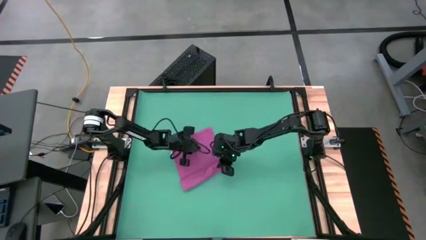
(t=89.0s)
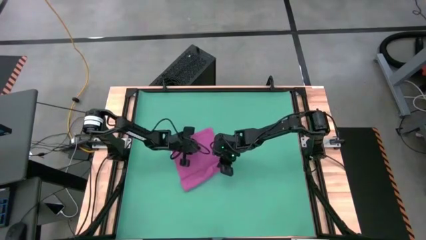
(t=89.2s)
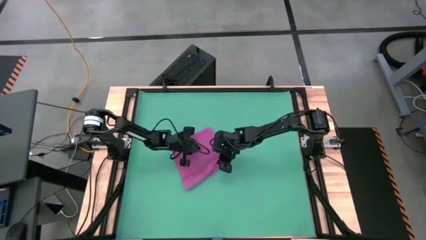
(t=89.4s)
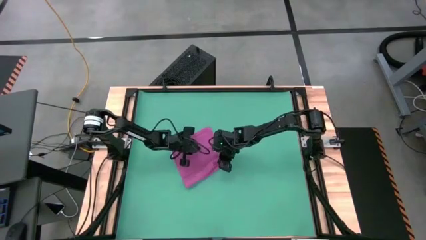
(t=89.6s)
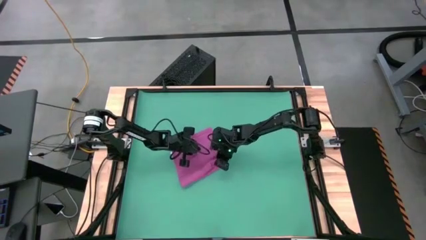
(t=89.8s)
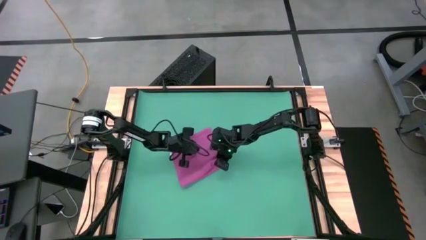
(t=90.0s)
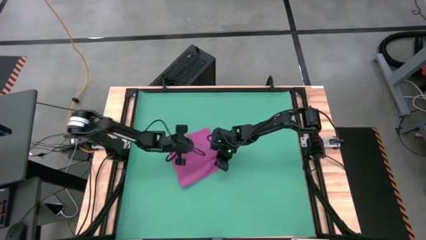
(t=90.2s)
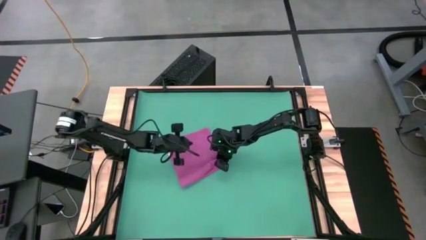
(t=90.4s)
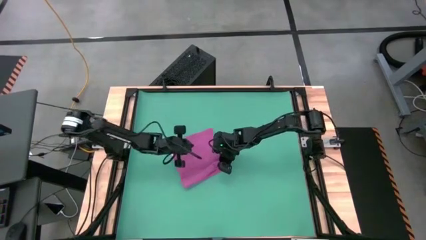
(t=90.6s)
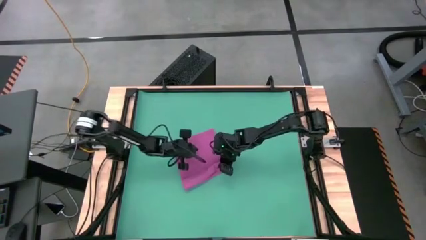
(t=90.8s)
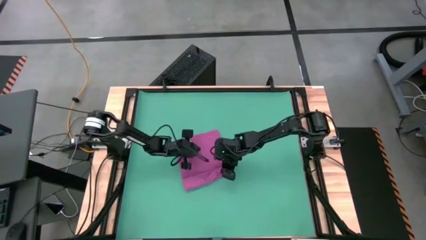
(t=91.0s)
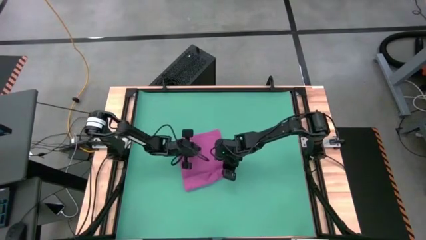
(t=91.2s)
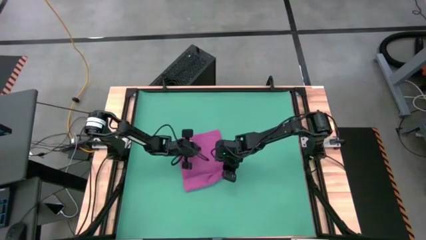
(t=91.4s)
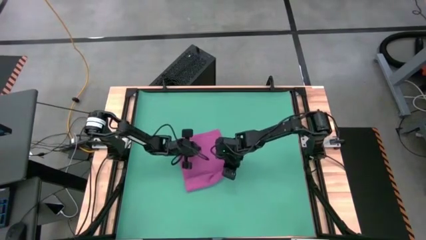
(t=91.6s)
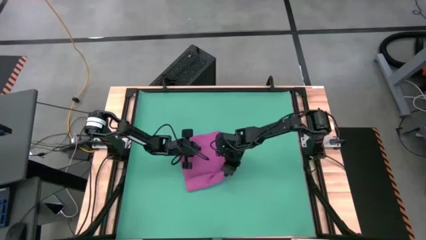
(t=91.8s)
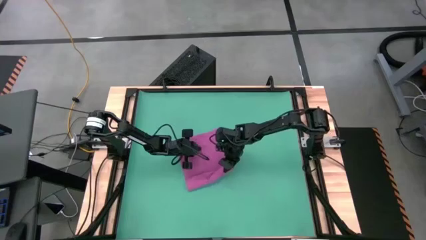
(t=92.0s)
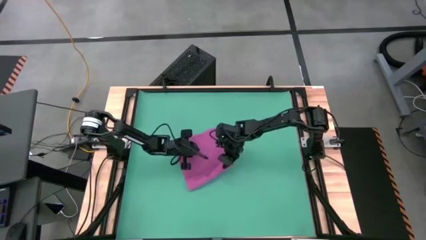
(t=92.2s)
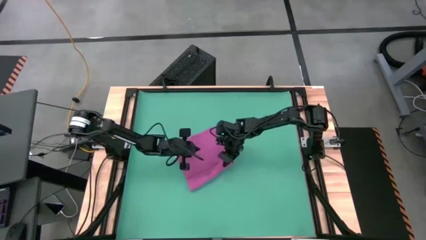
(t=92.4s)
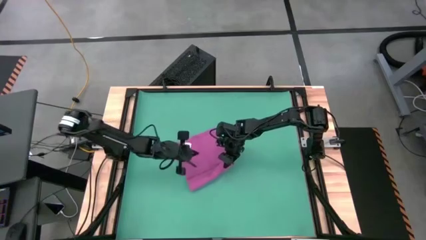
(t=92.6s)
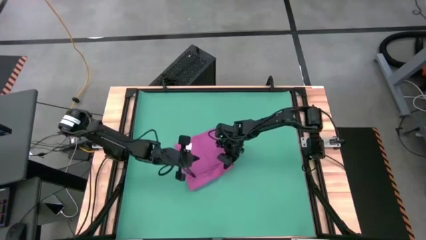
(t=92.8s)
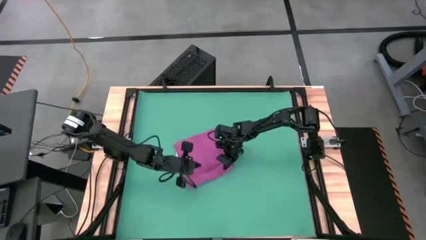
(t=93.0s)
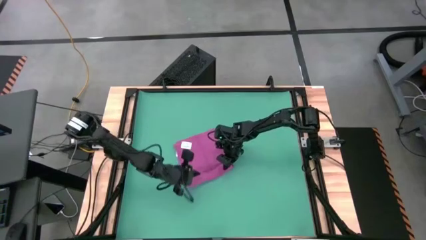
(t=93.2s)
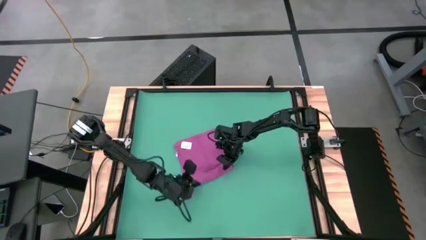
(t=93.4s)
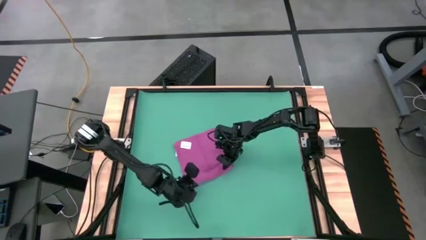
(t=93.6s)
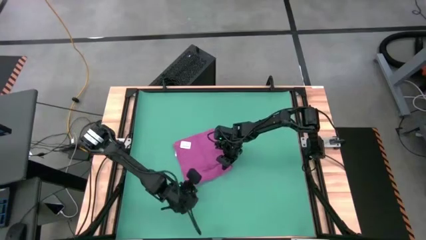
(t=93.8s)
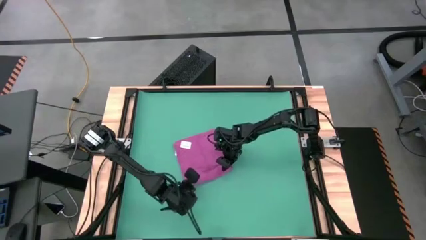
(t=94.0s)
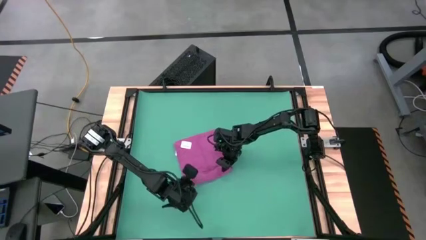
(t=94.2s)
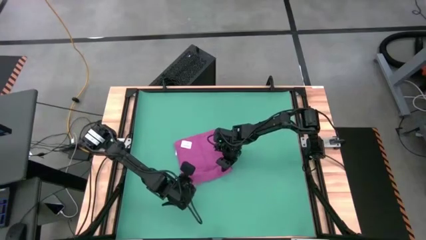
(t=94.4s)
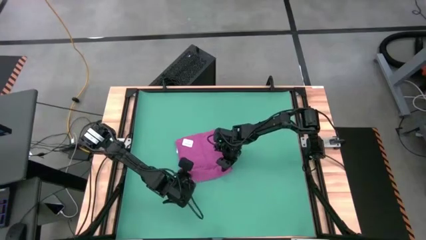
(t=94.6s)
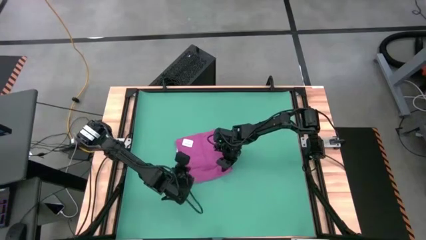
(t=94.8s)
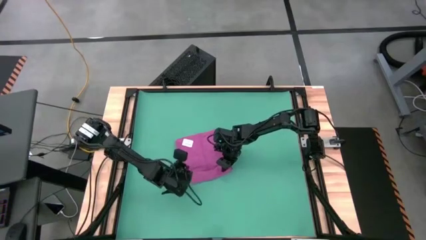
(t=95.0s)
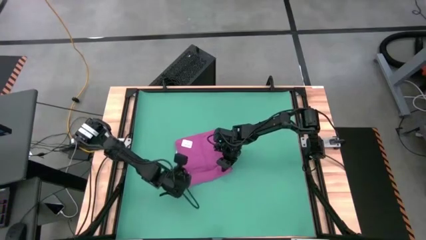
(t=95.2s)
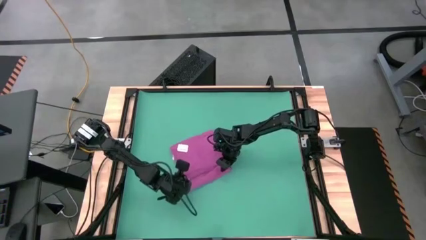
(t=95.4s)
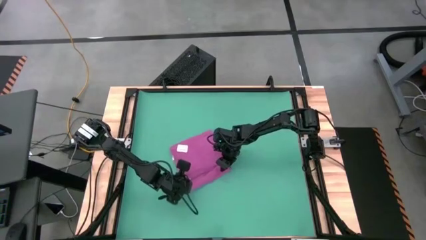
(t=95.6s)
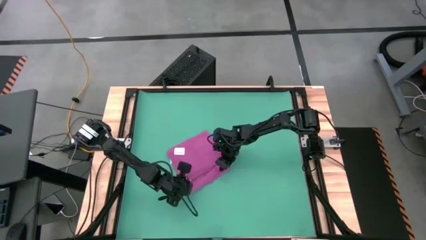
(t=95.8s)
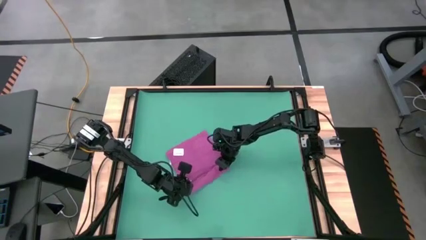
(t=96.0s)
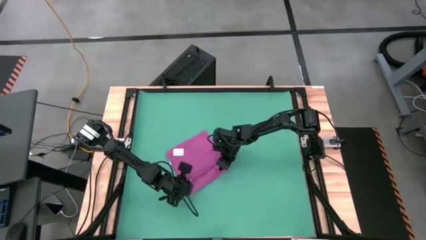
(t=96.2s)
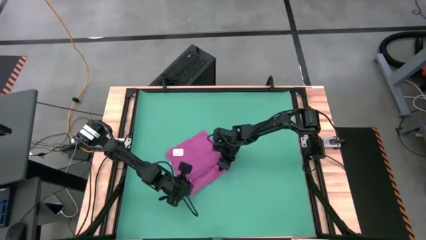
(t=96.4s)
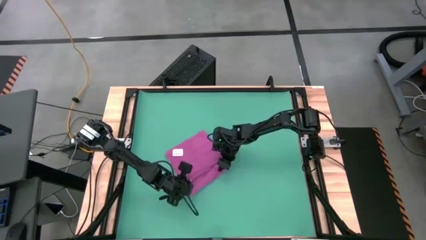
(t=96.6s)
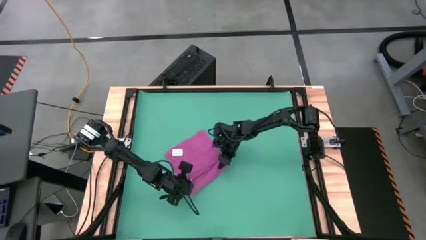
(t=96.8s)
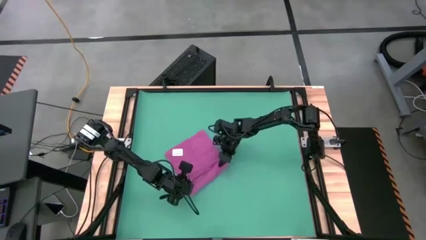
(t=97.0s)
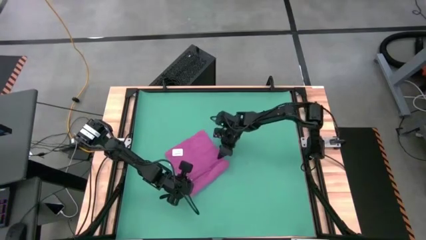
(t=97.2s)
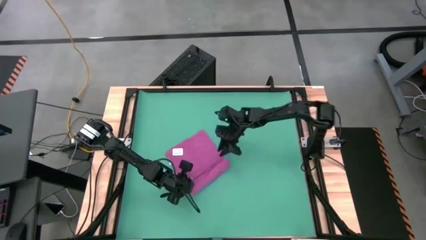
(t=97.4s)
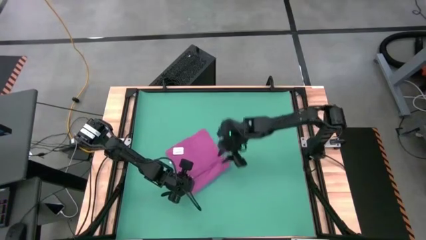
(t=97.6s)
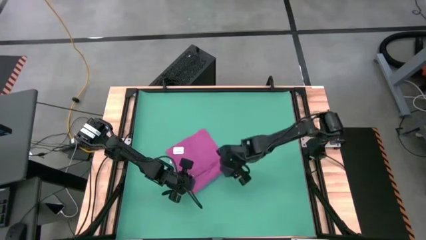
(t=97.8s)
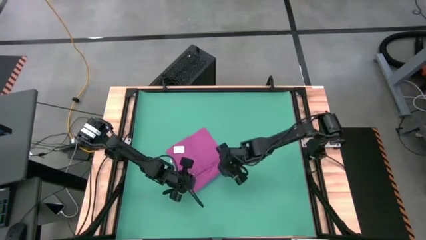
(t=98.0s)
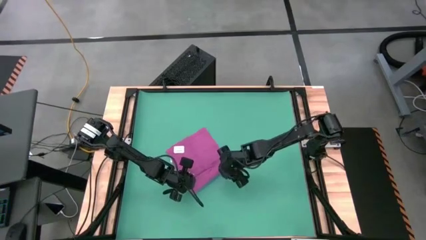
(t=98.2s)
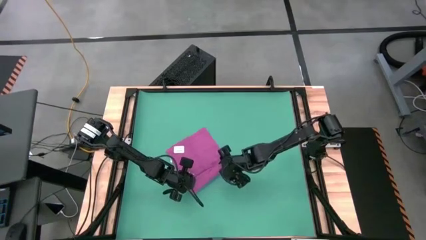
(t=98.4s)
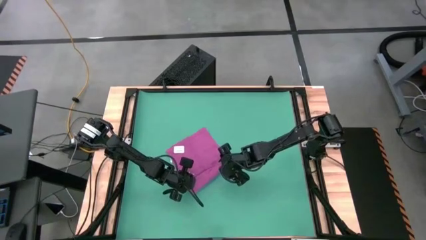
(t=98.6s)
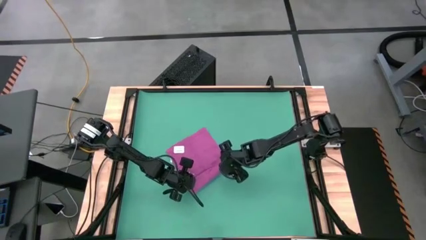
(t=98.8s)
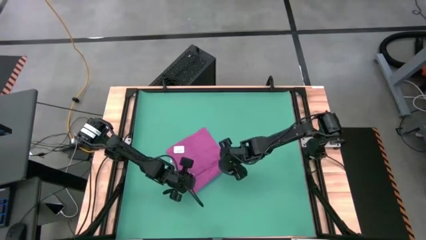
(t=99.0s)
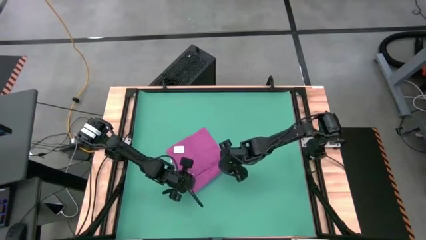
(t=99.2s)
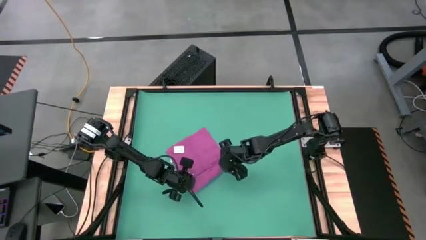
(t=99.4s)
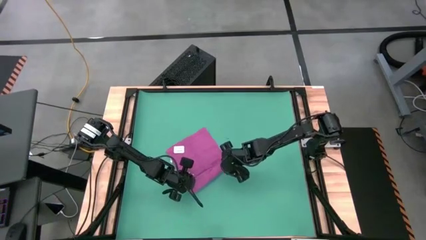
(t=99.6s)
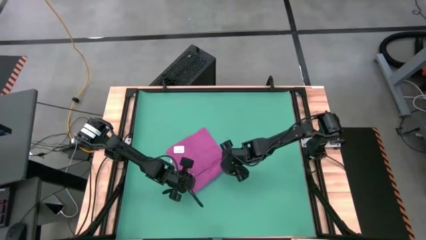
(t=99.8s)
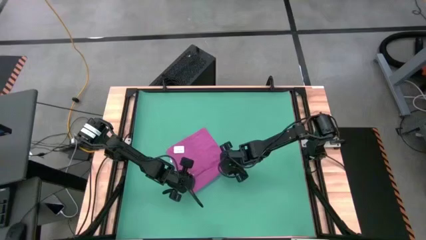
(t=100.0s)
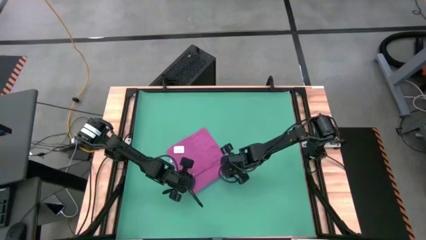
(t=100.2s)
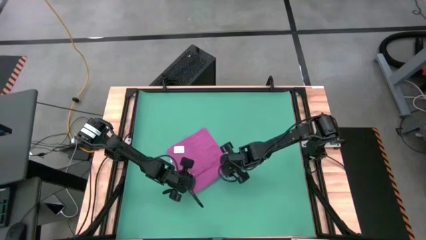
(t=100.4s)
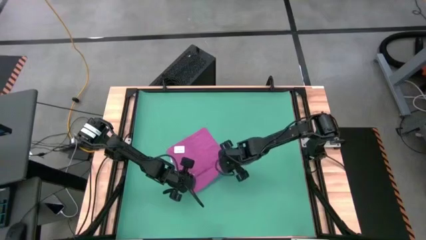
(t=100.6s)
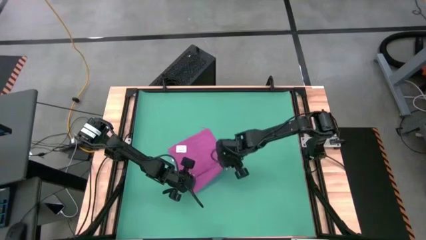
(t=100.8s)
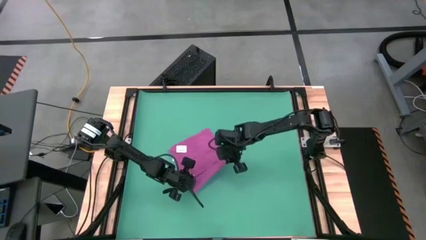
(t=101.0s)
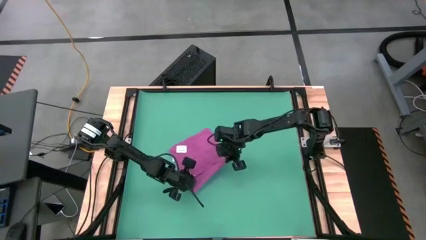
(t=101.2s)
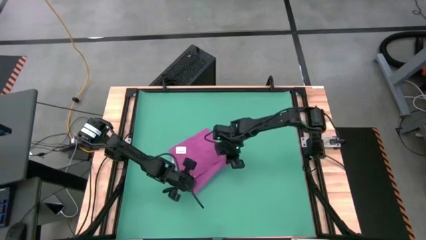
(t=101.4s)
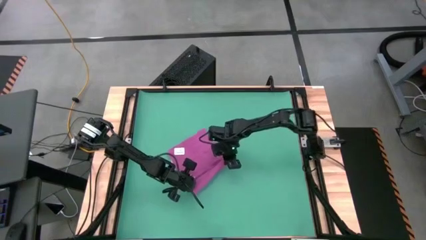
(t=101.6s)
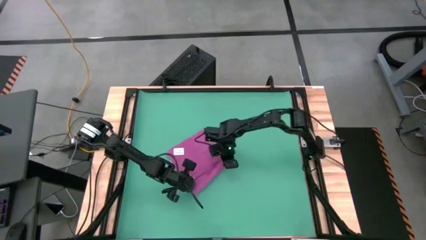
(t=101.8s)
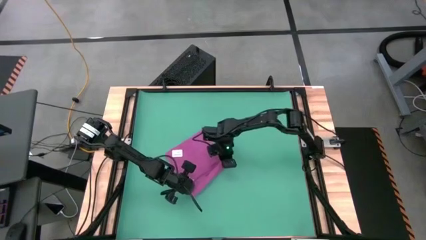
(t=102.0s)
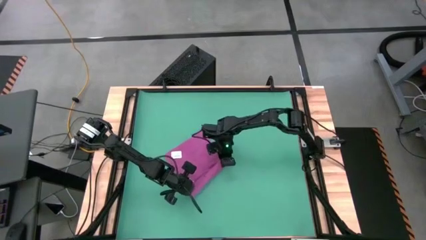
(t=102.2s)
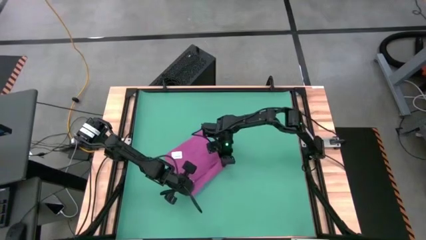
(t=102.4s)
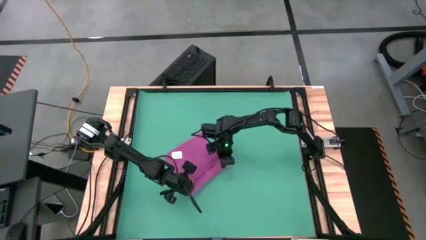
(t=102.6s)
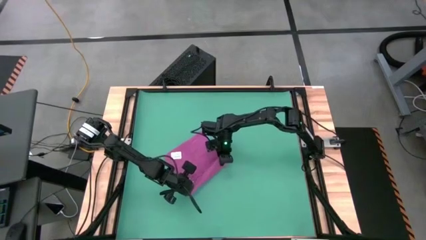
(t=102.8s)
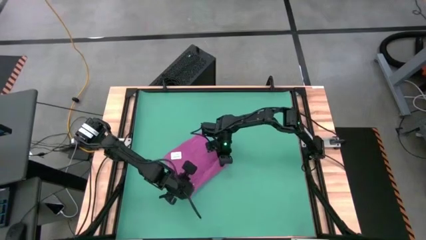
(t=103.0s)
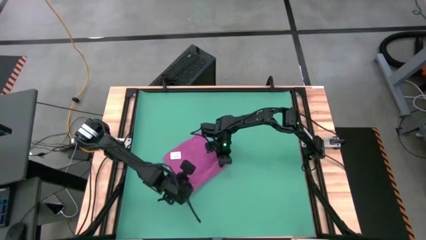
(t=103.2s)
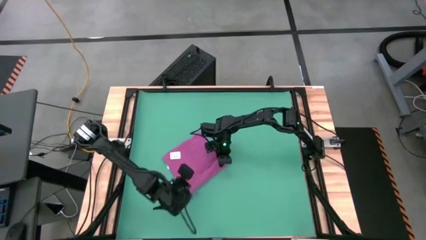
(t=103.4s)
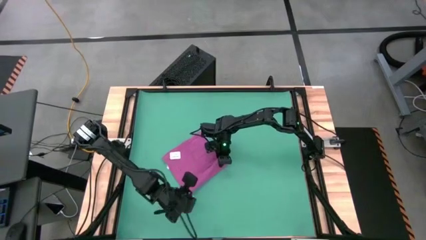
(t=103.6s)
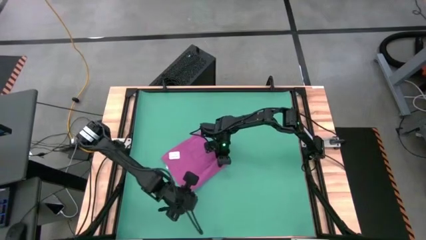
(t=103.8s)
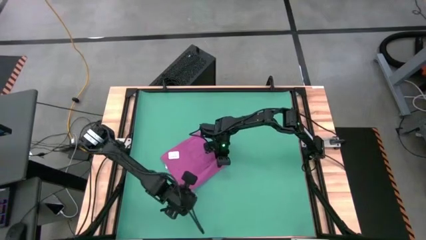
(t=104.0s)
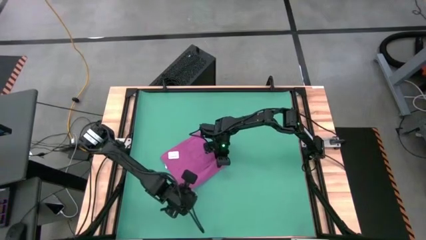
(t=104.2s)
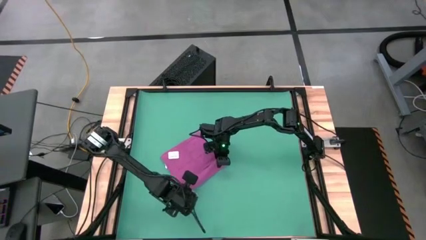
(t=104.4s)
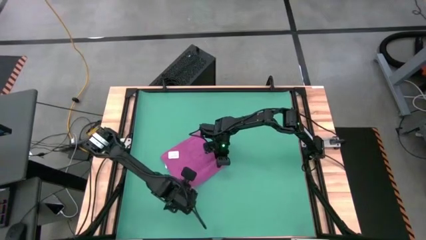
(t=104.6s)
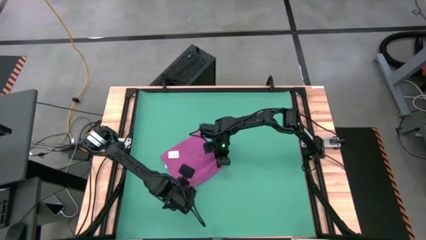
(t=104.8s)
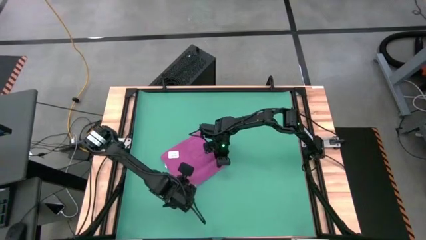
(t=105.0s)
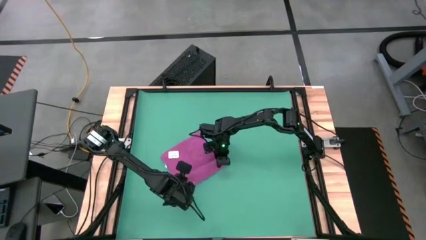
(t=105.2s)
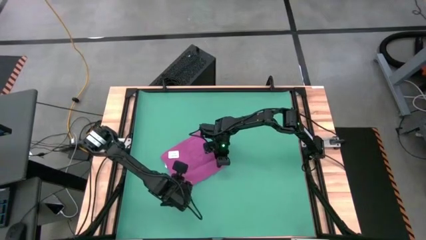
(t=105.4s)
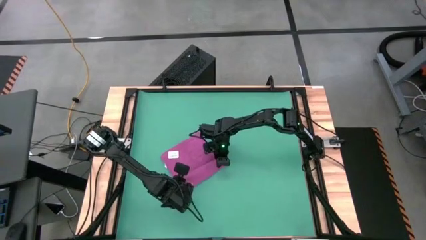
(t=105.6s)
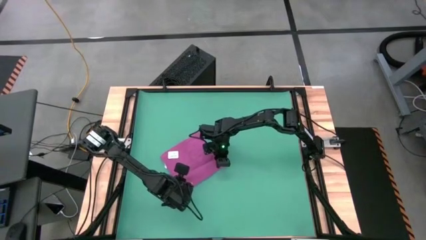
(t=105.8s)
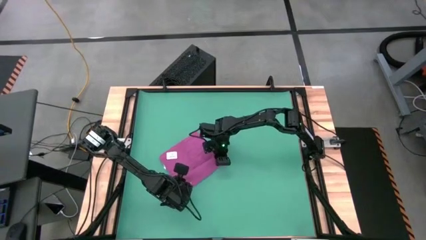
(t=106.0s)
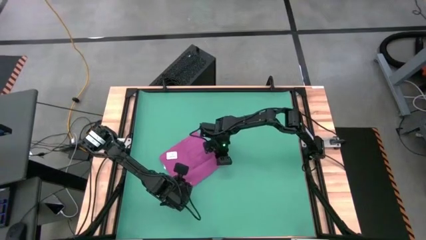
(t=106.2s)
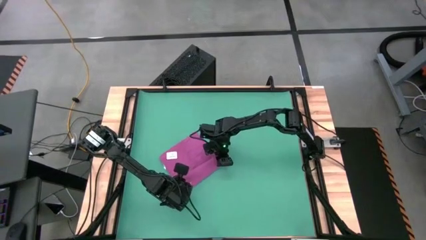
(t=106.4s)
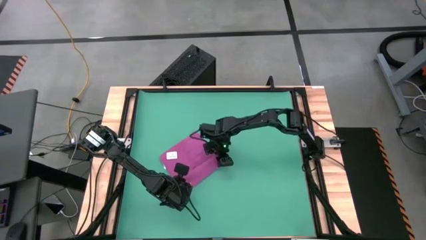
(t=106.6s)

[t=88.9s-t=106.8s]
Task: Roll towel
Roll the violet towel
